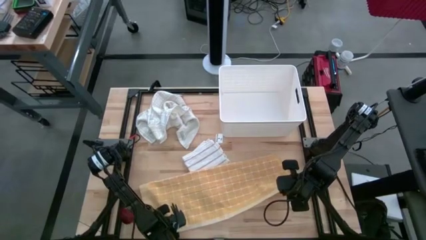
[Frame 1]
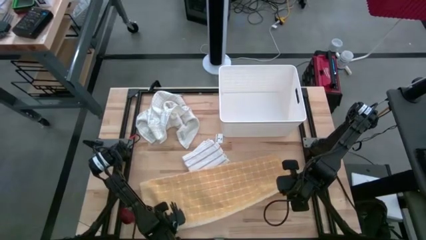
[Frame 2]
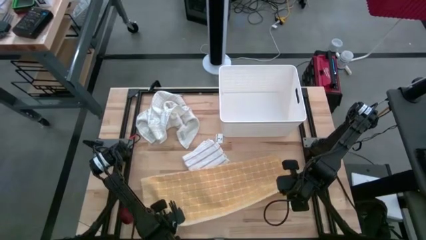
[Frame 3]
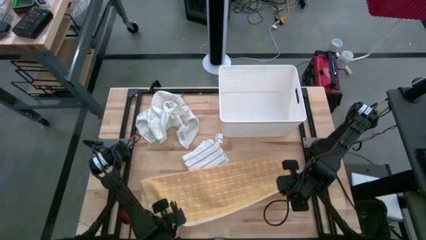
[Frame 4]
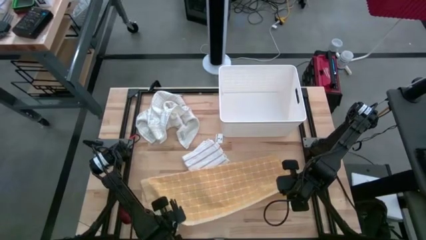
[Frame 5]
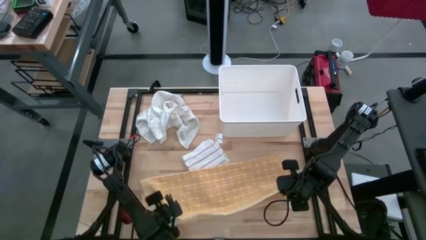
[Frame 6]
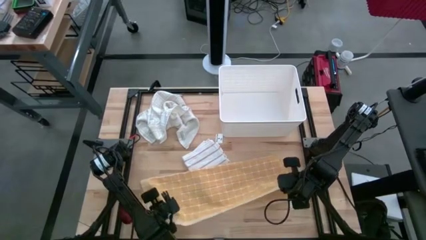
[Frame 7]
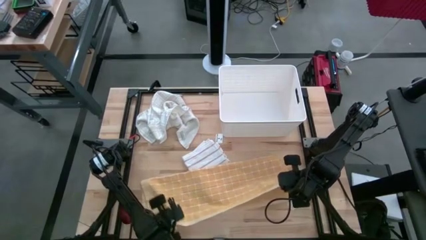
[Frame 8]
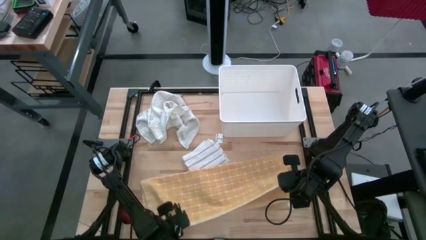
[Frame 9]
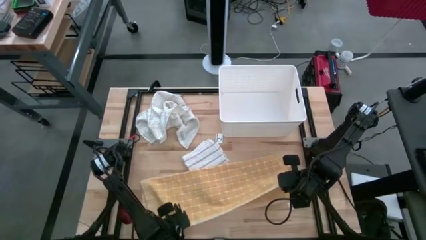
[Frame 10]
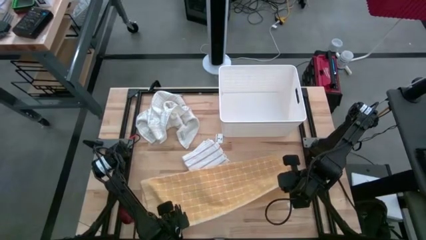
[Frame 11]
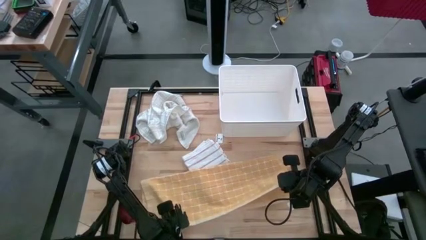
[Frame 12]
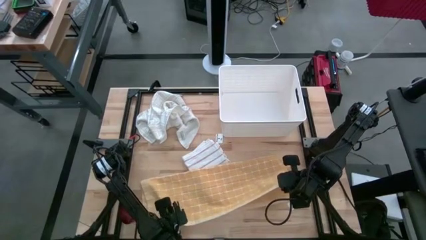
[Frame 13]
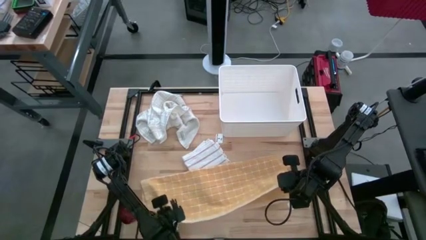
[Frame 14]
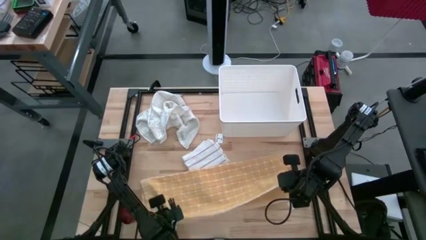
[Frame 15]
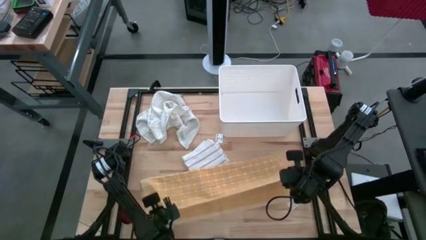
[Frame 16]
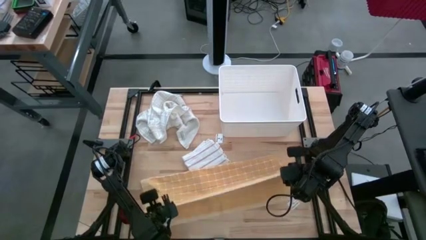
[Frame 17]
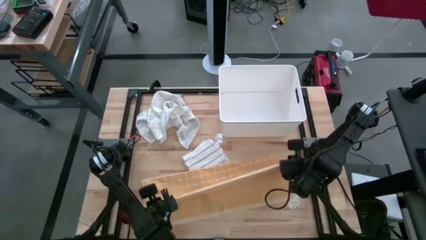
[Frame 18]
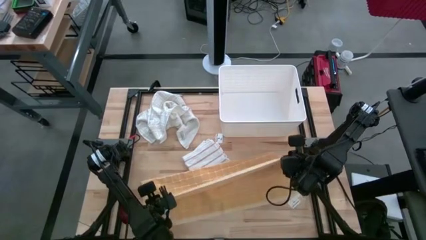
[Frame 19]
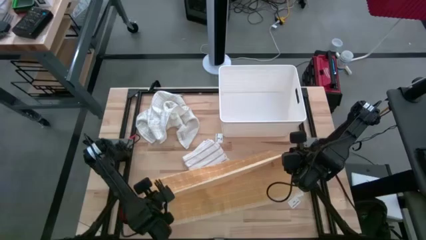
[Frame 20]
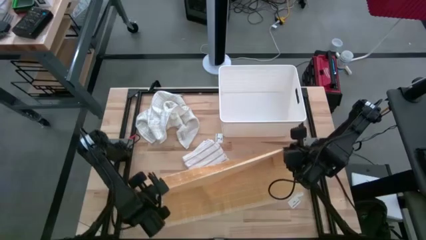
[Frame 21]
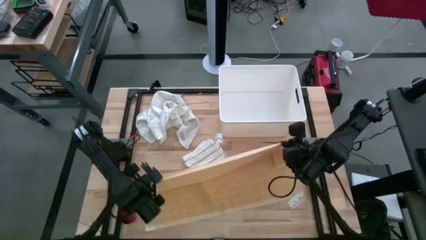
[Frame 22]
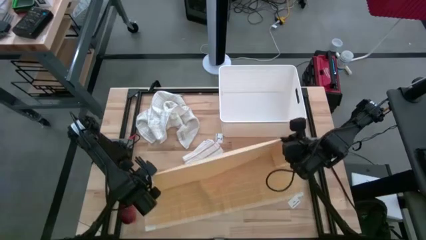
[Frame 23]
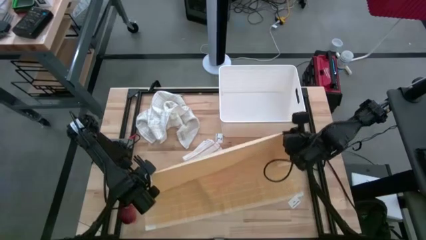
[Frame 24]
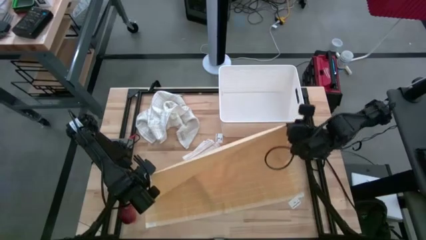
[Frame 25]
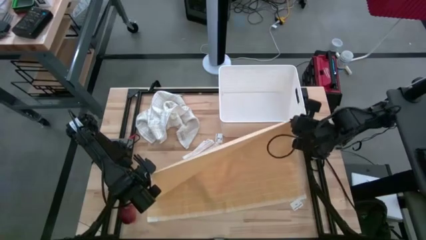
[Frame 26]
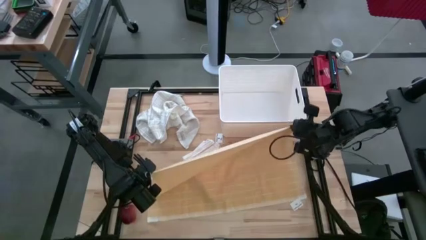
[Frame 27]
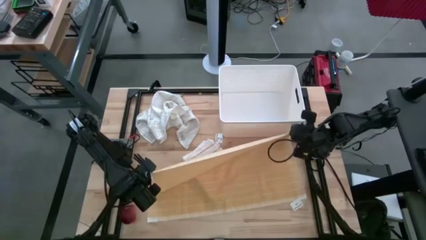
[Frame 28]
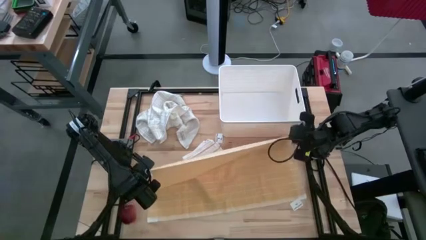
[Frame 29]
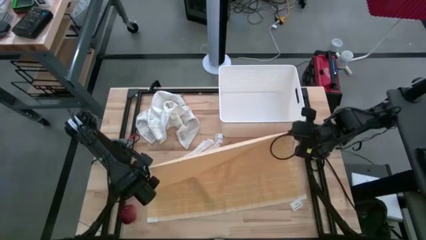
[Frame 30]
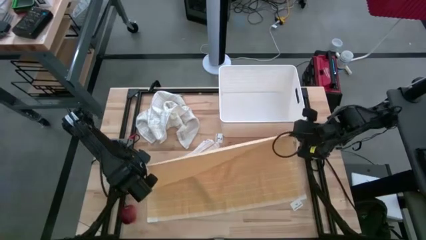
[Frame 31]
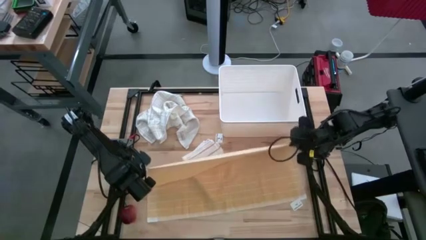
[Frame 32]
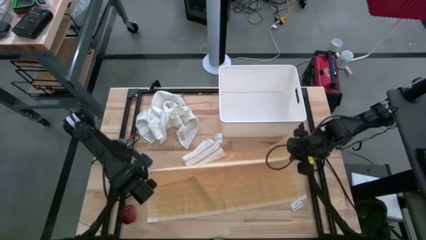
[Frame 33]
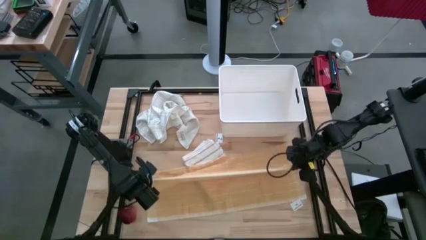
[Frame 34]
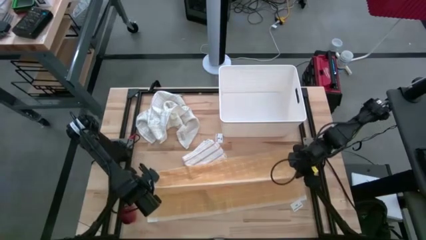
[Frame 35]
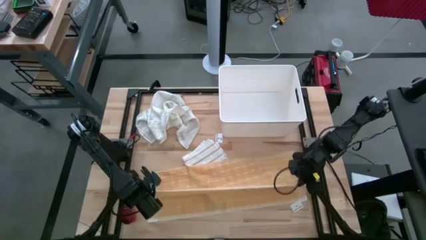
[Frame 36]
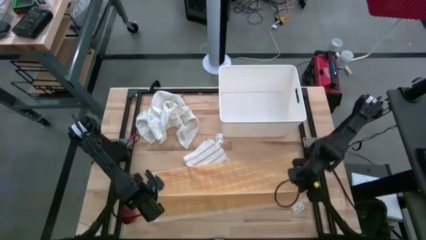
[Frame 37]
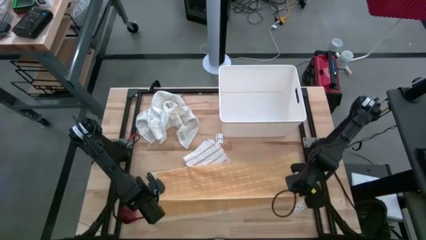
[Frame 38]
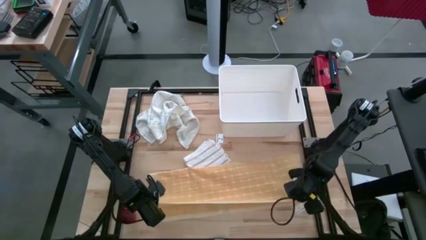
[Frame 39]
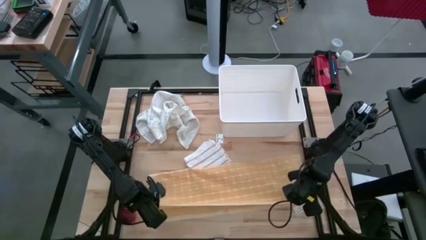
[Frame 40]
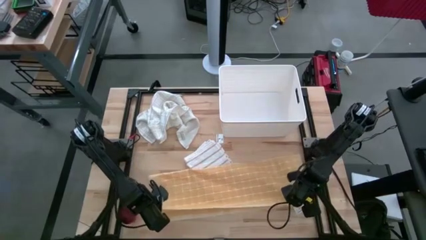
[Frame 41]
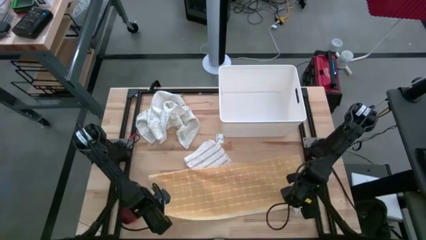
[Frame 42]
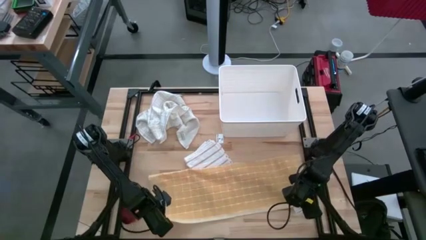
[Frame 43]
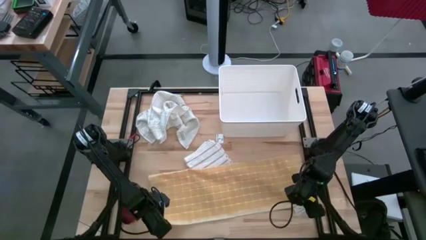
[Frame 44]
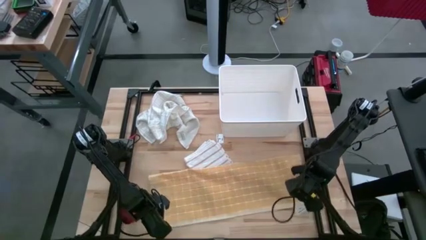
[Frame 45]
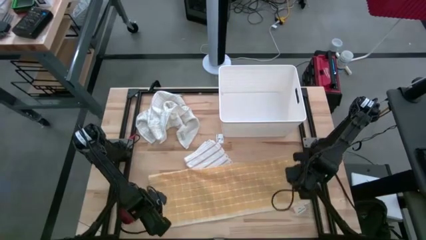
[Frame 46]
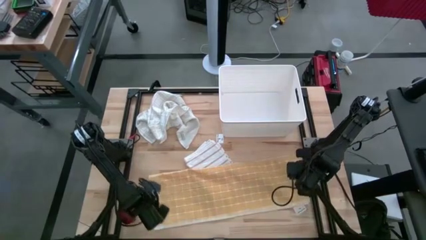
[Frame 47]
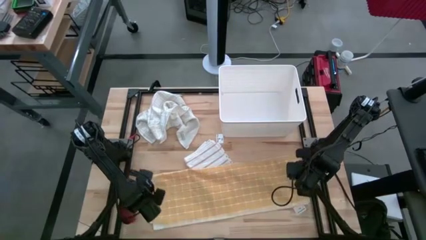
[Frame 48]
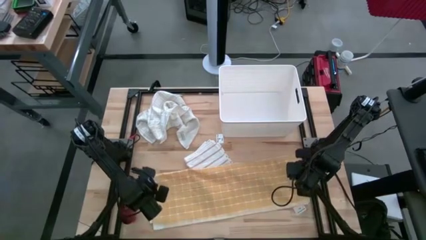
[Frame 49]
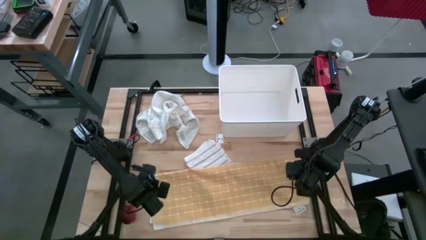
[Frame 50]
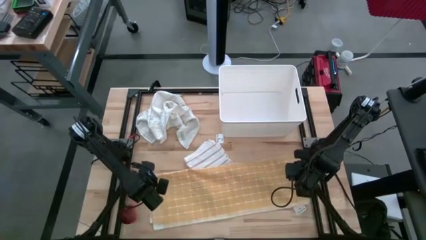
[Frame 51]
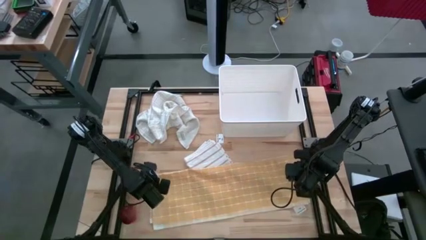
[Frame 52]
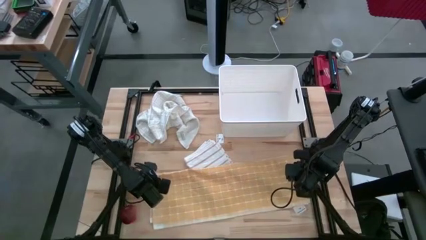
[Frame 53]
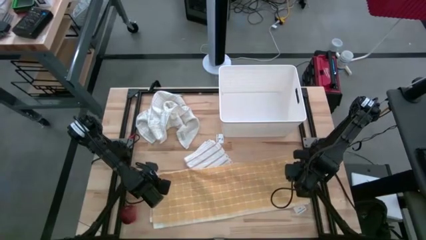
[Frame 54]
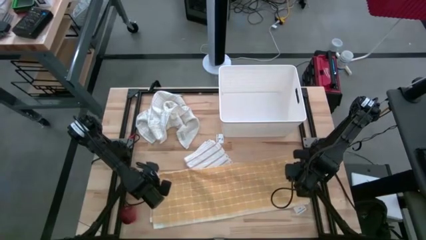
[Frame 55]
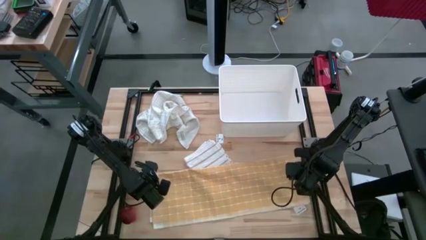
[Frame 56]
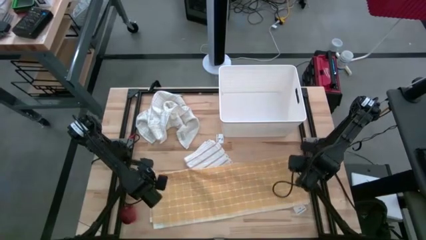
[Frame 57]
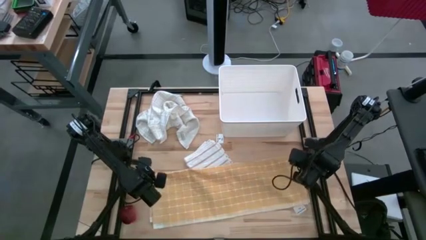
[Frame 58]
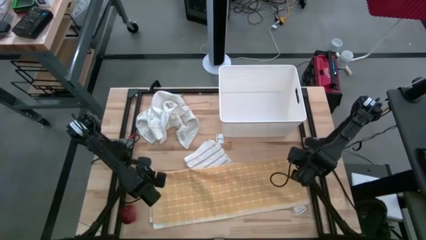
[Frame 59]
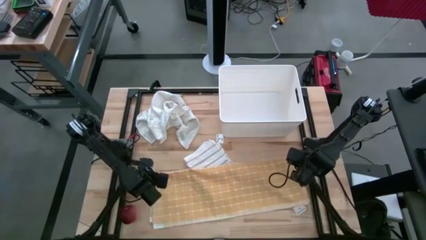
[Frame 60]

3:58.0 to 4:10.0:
Task: Fold towel
Fold the yellow squared towel

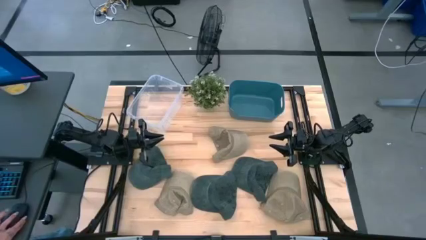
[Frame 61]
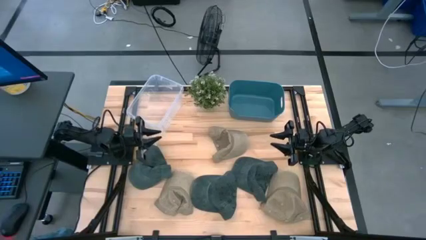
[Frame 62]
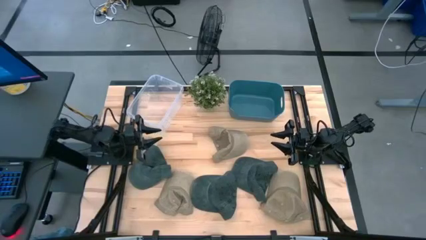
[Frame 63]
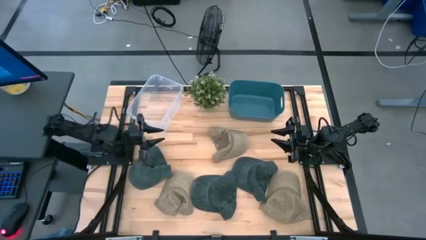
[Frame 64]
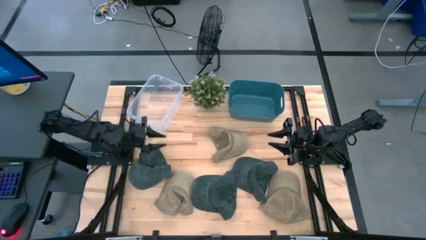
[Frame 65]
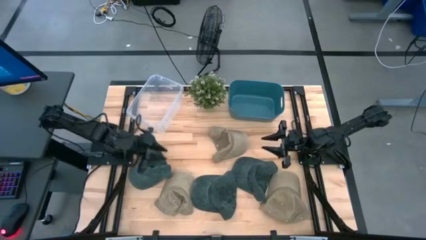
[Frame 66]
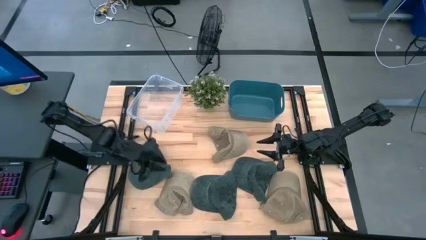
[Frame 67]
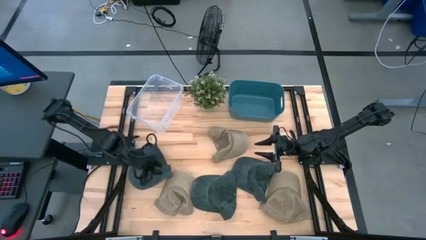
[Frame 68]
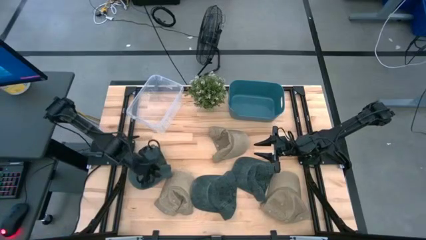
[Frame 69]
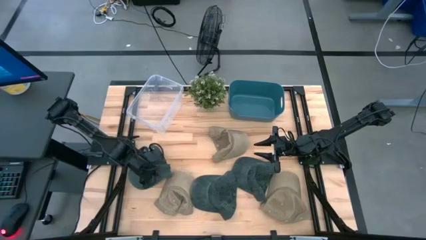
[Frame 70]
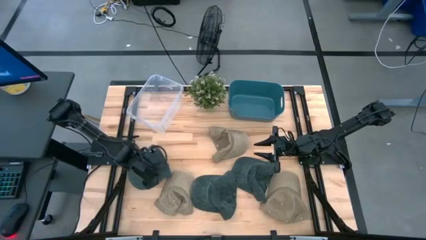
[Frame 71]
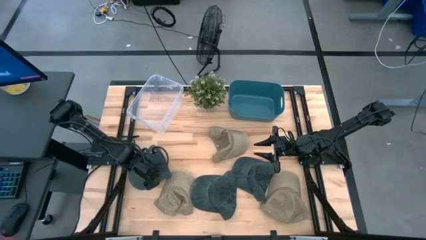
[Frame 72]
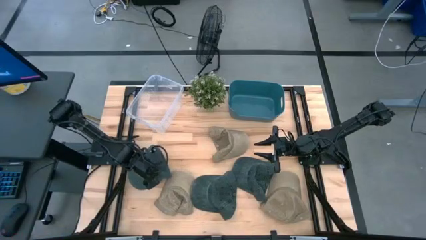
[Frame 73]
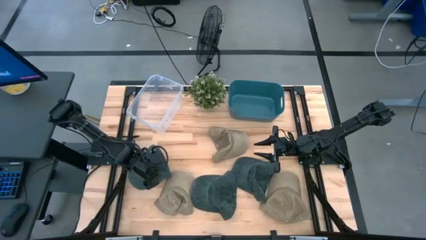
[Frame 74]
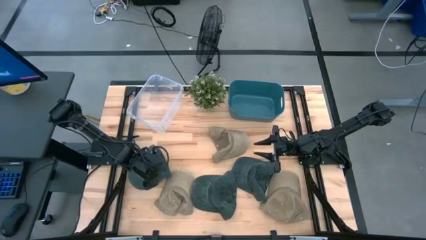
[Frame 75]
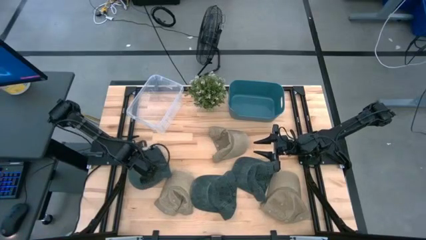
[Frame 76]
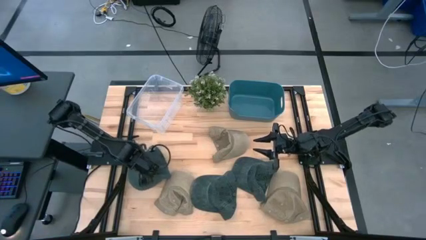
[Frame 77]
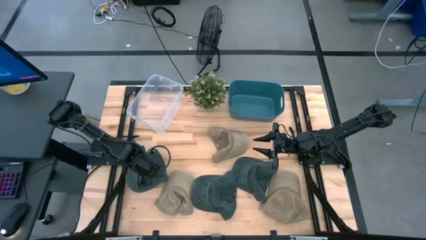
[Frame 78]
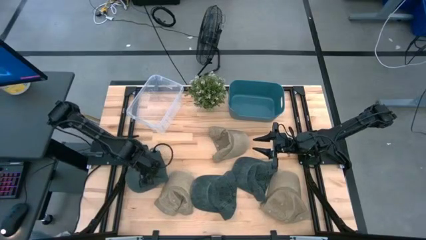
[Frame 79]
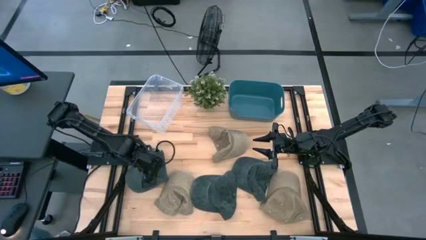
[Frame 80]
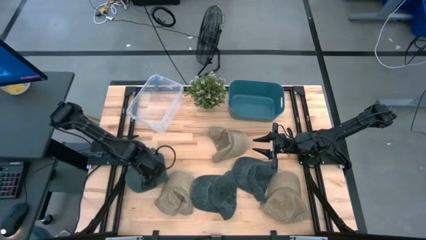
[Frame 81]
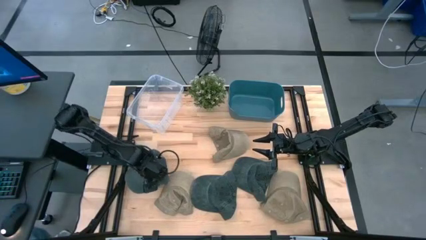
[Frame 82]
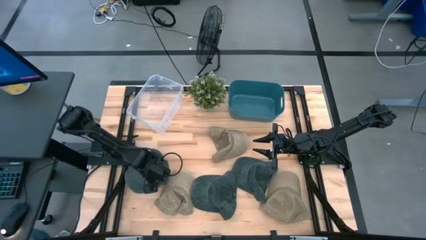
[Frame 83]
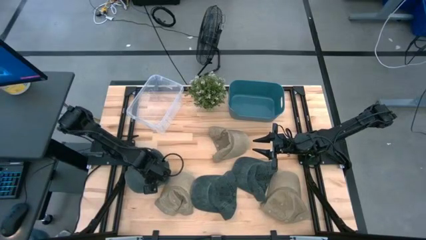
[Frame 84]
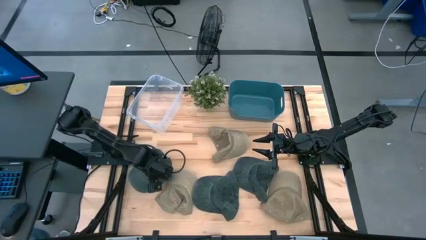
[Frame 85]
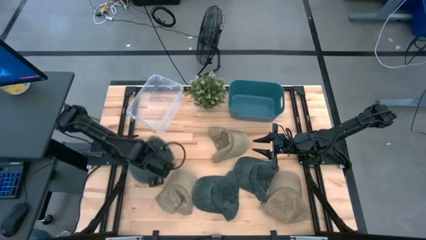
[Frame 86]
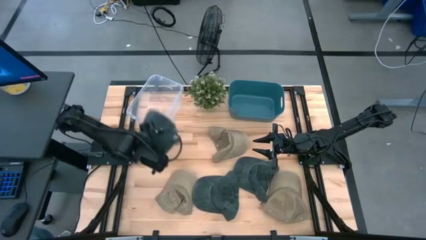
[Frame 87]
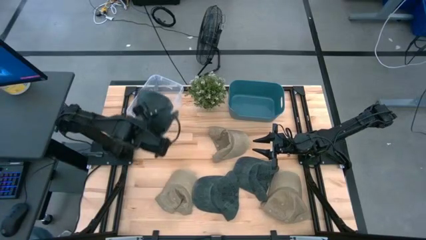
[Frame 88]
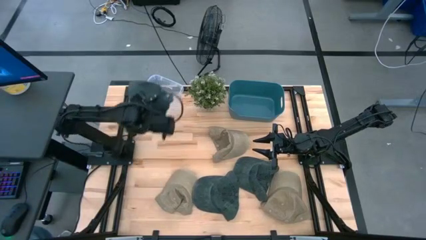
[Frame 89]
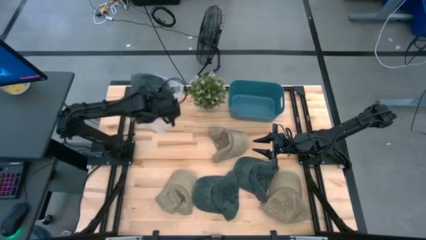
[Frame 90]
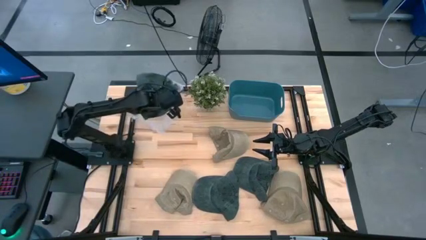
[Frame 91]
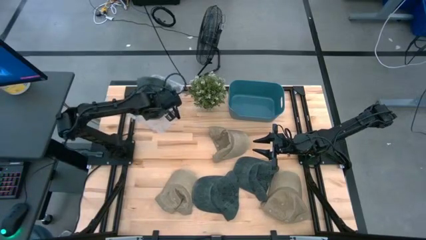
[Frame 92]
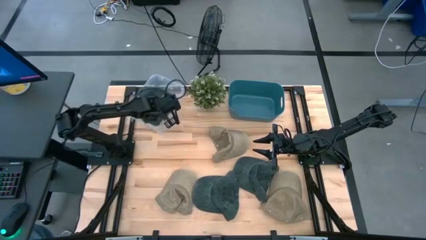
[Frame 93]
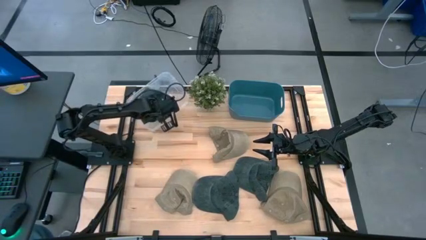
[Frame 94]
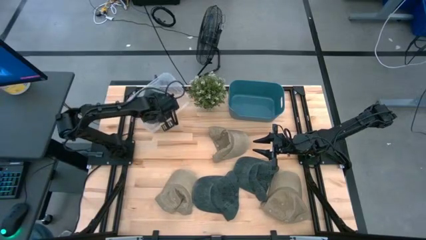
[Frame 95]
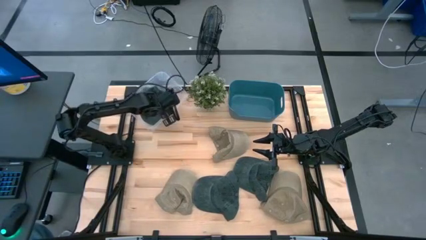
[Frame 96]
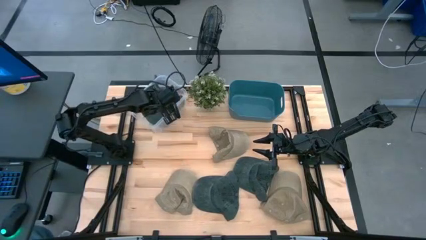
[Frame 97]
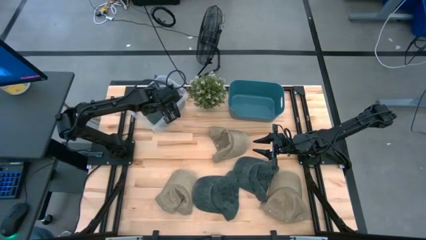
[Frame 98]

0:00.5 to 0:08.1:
Task: Pick & Place hat
Put the left gray cap into the transparent bin
